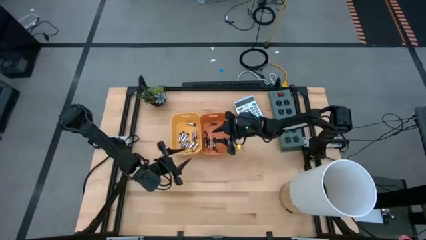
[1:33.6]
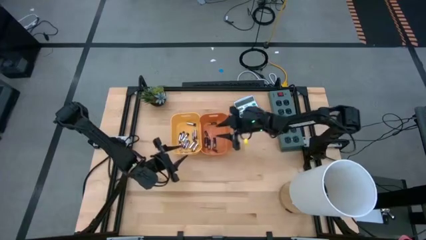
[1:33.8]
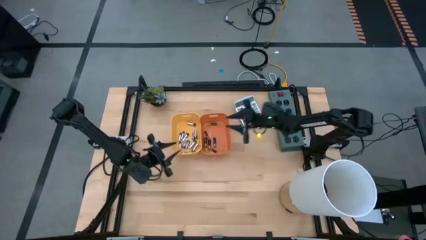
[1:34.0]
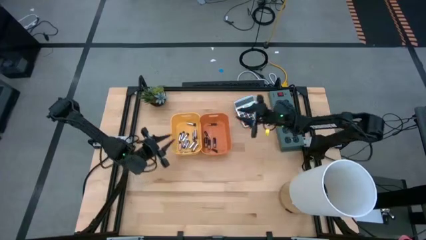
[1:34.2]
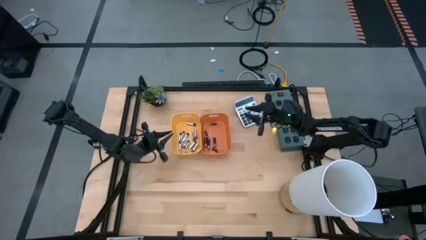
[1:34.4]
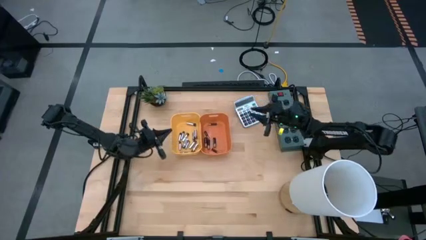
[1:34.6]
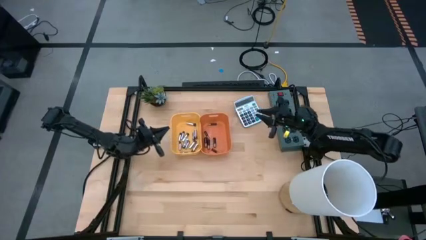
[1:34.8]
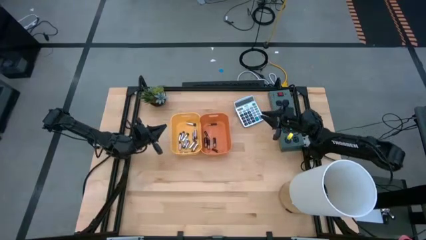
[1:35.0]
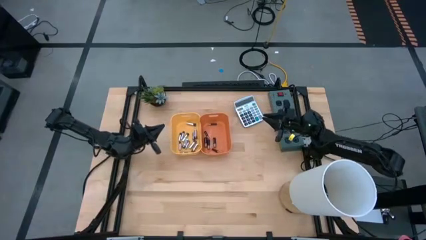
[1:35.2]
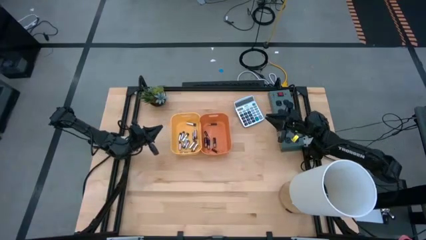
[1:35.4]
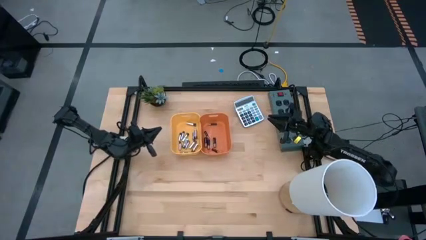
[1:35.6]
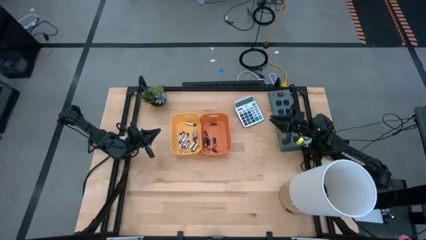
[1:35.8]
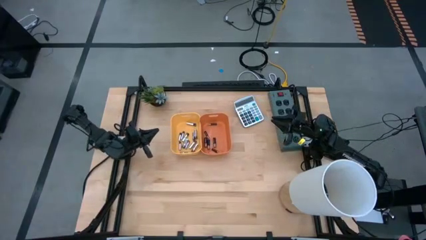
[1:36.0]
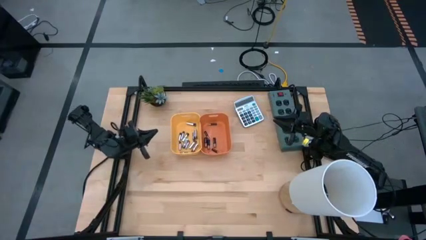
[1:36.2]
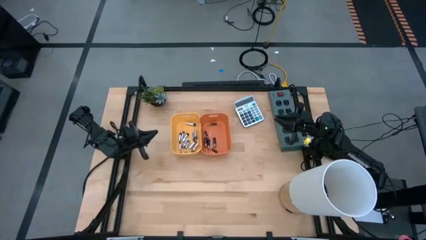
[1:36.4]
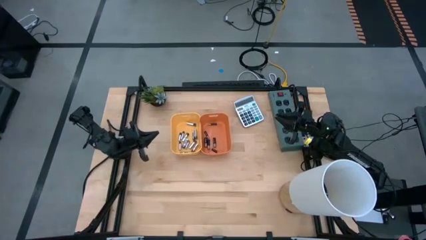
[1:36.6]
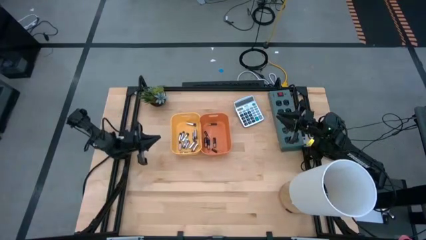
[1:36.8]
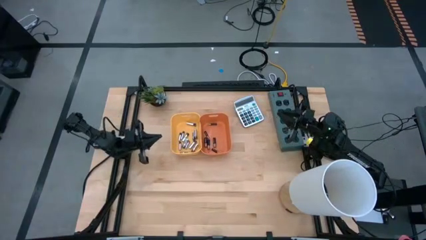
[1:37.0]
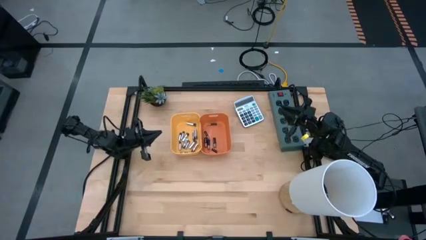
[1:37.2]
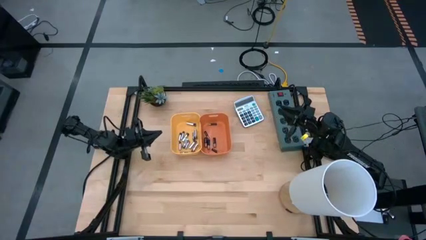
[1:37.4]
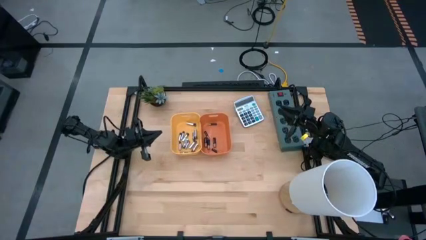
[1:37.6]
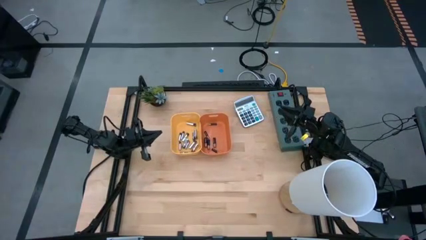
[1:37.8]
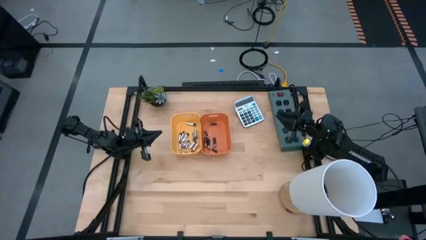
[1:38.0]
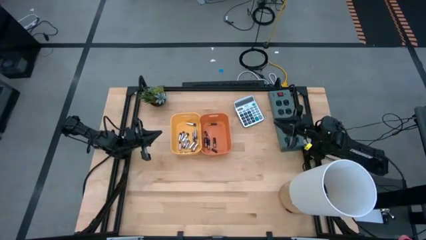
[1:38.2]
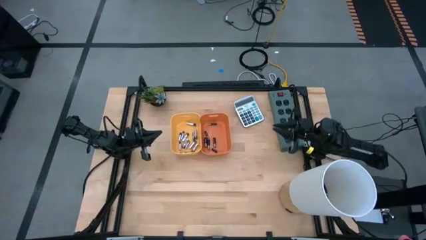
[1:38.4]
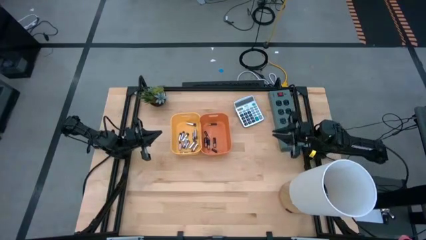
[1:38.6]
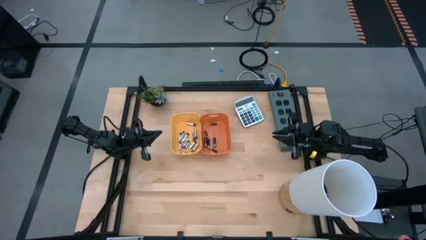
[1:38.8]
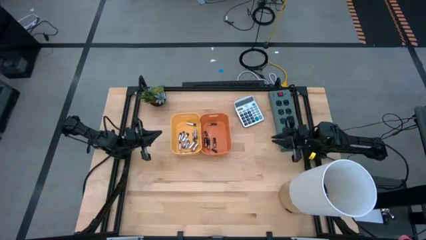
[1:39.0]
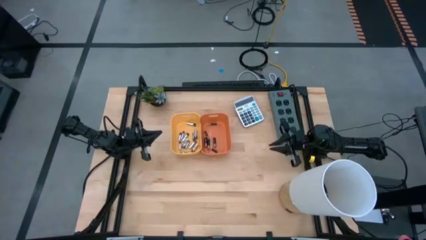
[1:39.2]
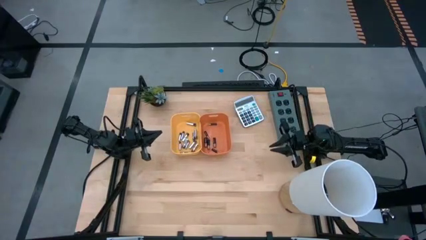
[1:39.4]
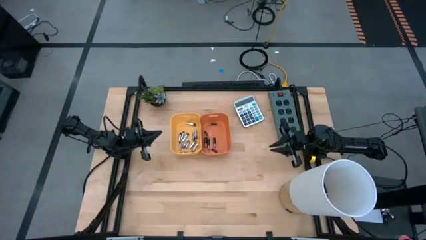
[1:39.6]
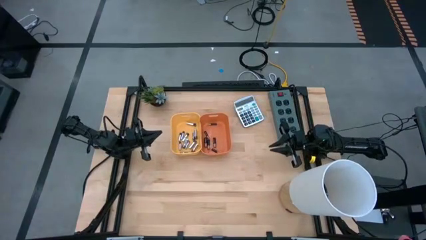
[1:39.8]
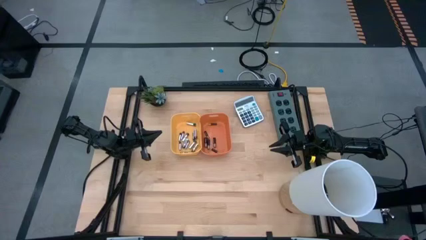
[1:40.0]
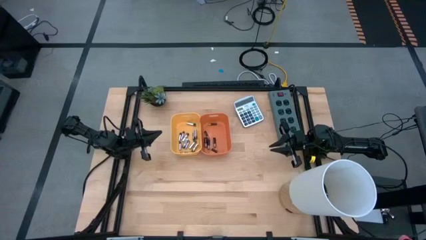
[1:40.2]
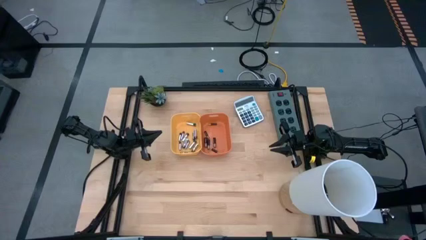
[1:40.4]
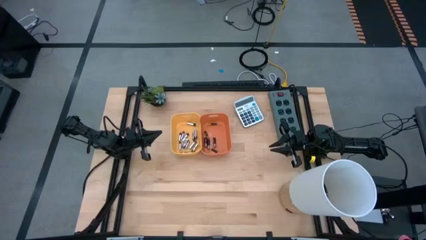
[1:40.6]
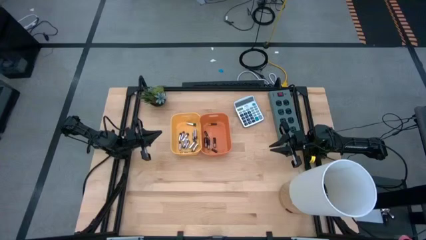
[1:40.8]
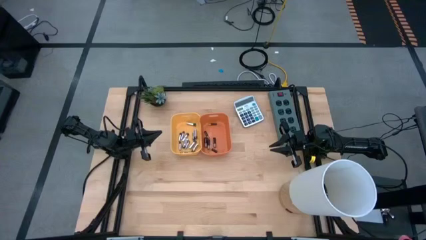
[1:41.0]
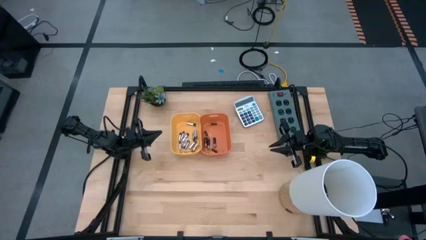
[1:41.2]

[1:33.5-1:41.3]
Task: Sort batteries
Return to Home Position

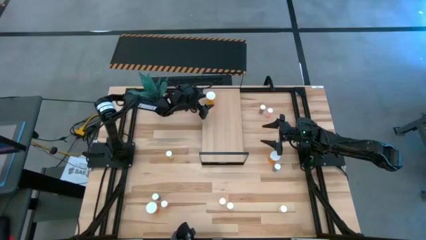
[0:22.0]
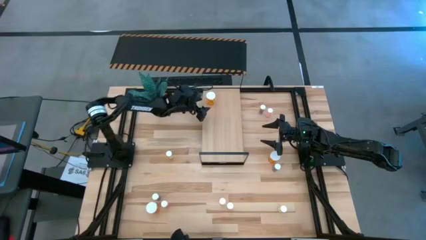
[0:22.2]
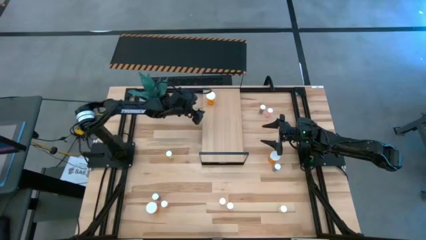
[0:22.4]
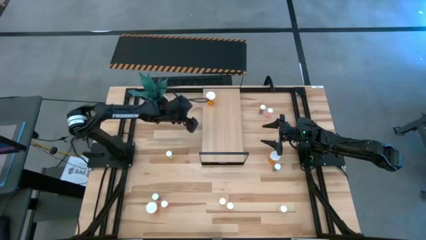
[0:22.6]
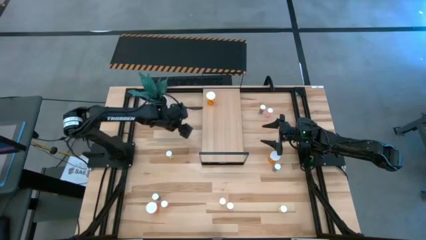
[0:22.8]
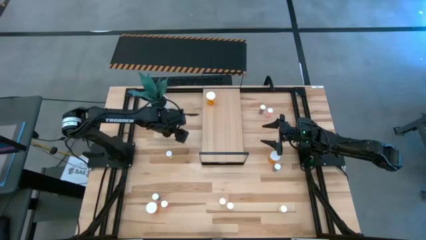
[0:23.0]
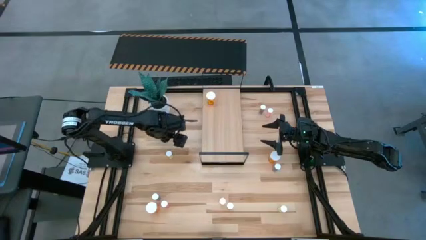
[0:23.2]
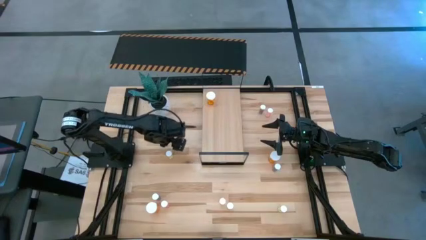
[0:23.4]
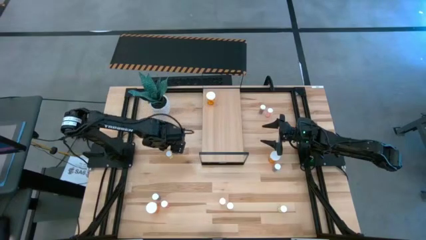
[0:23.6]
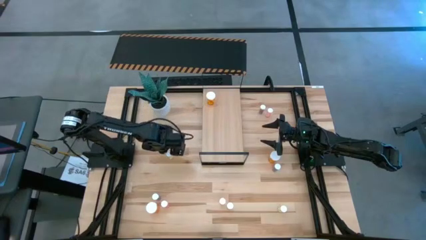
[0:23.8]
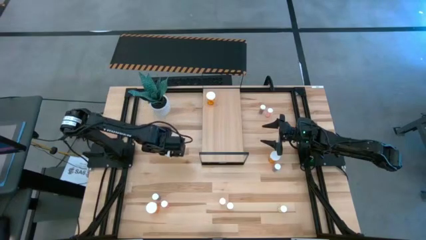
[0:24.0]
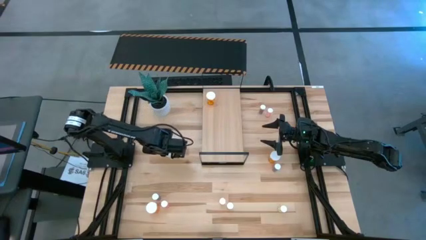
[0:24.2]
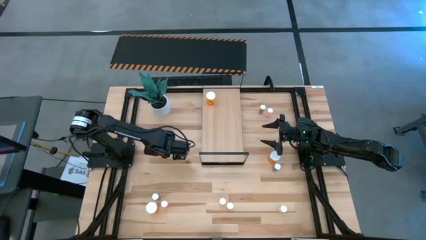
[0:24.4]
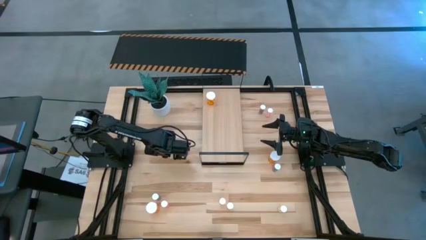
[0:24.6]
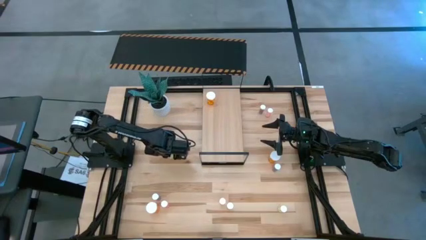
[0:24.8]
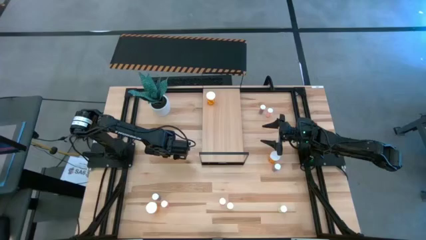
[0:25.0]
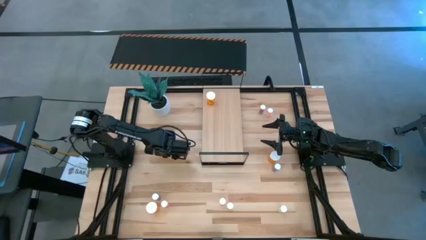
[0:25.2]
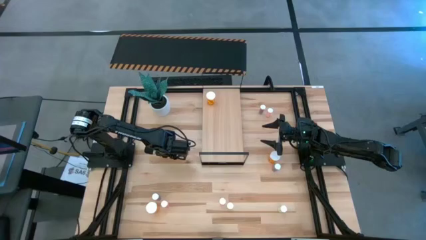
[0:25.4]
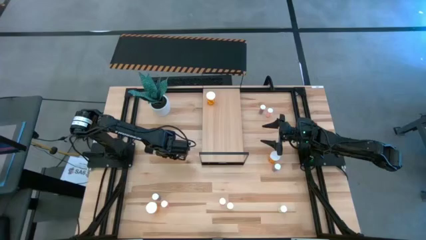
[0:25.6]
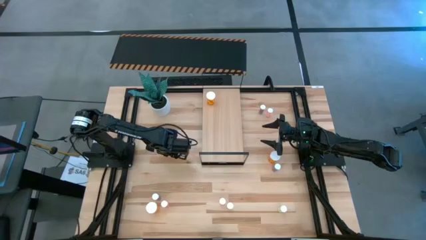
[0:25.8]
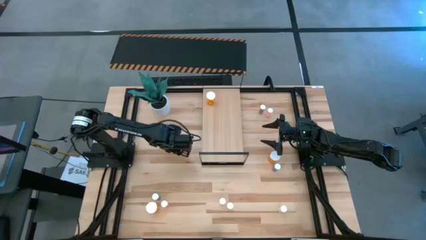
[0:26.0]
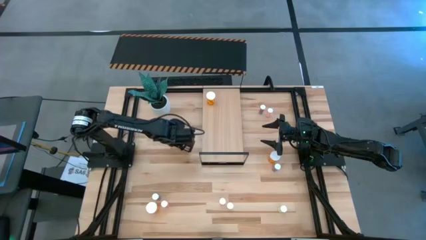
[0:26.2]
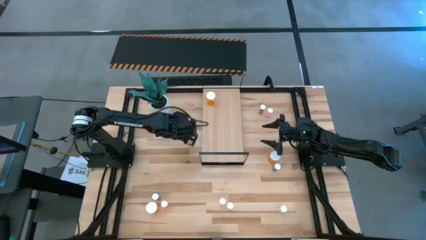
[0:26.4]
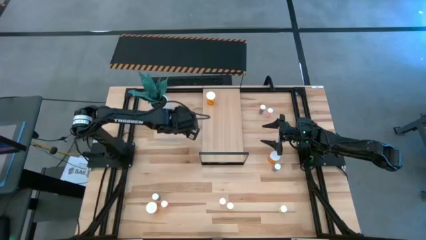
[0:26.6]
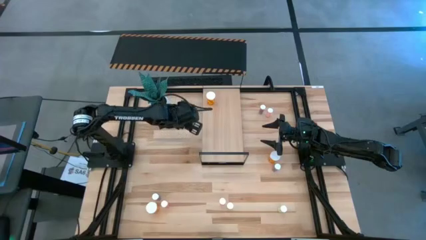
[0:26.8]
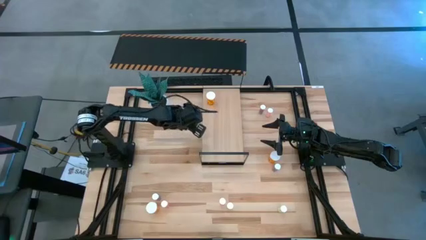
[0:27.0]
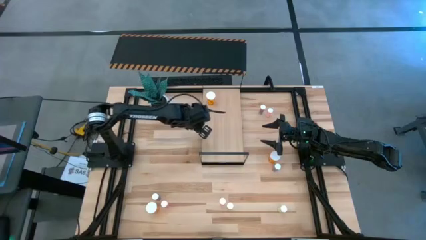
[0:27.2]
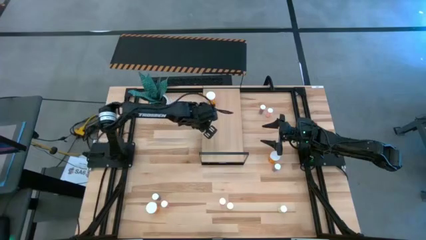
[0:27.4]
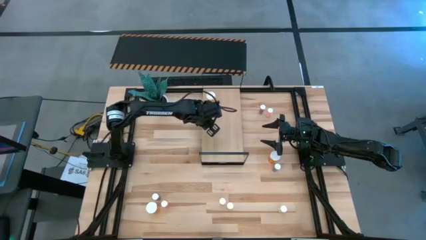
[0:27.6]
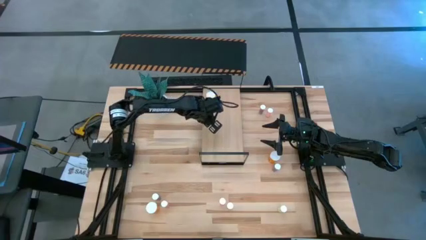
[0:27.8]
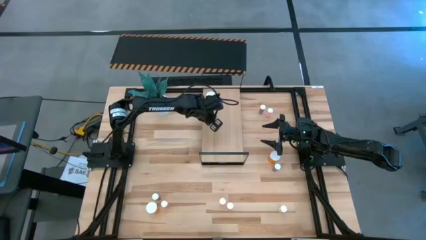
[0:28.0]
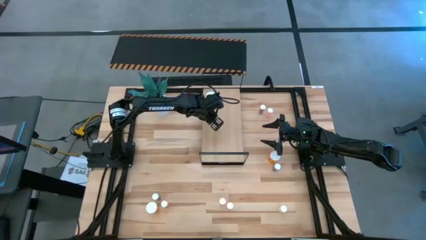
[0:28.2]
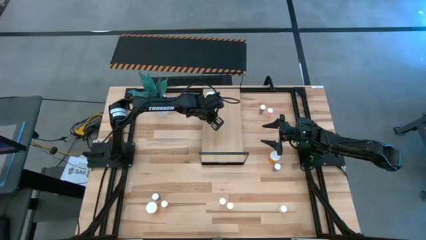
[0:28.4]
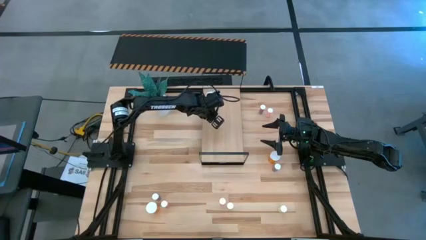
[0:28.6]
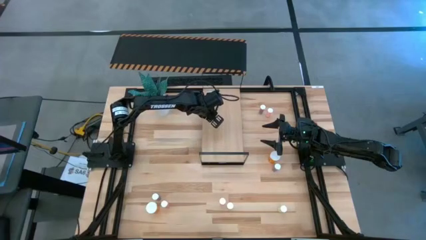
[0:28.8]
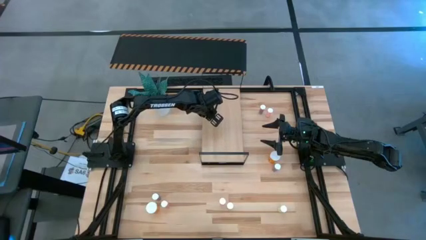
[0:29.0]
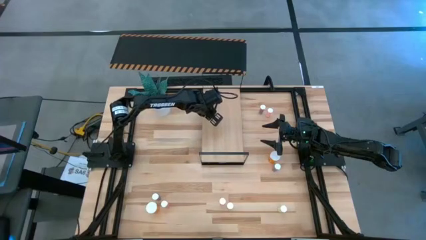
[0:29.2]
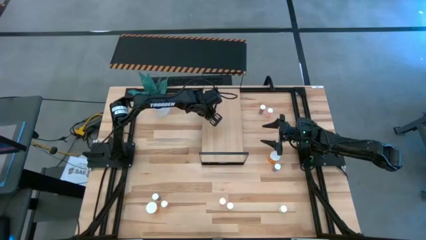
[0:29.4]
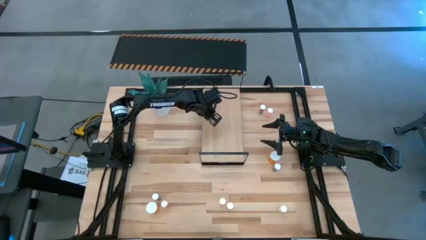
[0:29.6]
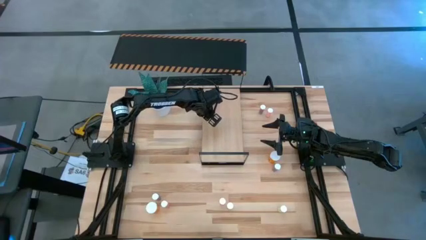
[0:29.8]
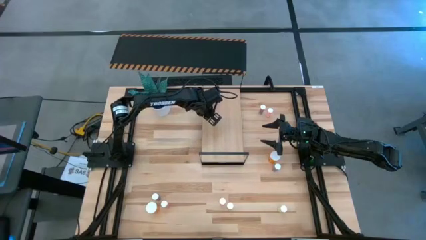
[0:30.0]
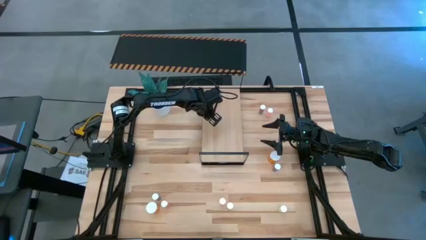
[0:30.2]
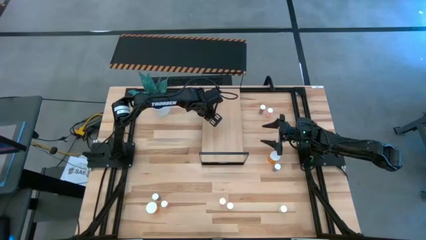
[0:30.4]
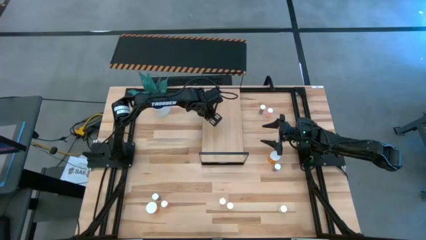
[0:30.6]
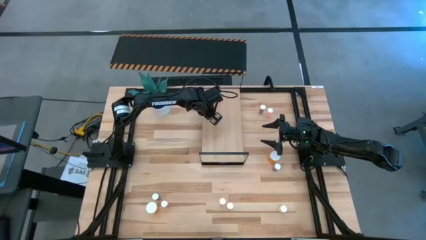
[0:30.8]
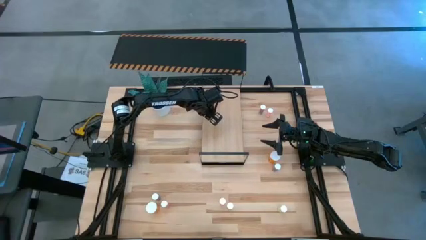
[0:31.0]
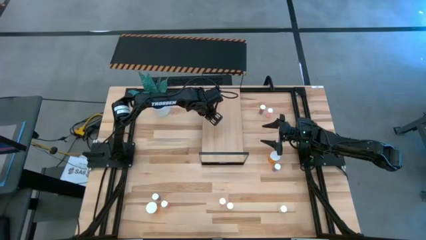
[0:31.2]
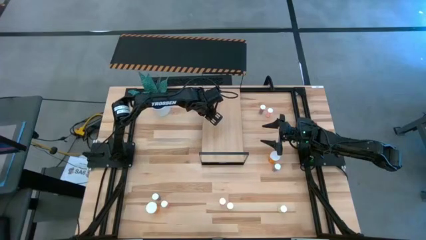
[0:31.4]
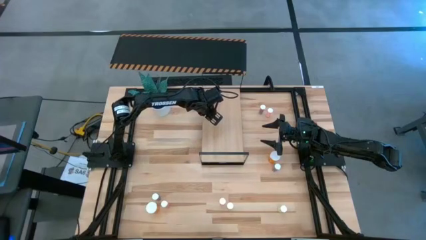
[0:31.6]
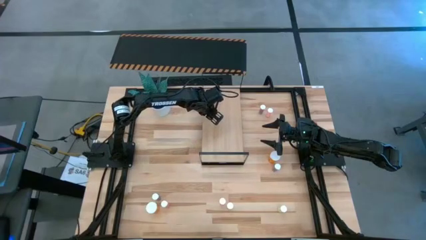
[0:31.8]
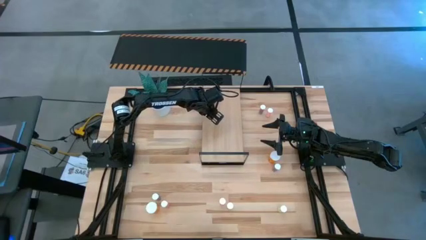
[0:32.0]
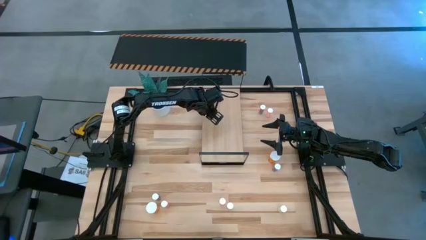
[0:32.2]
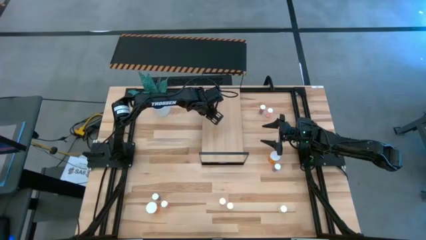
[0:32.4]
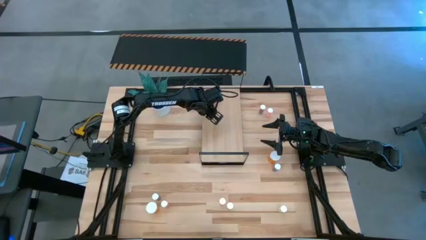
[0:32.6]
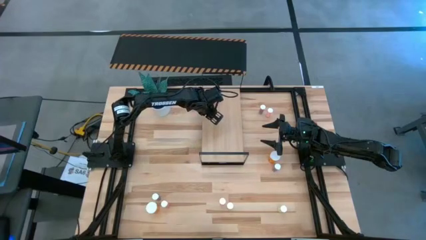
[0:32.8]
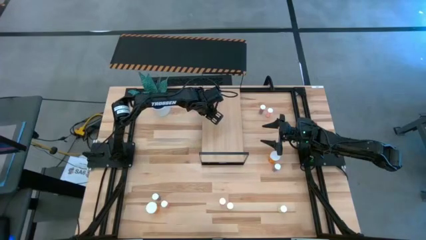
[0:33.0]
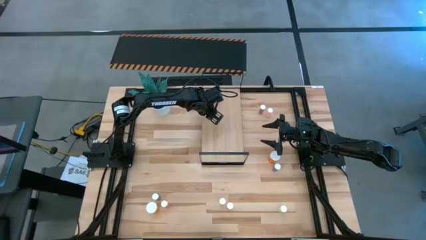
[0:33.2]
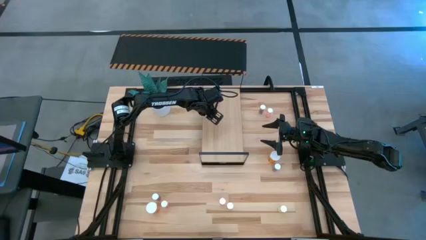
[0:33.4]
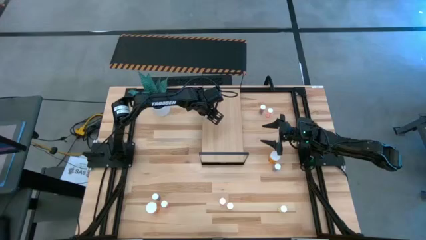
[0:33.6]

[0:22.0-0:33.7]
Task: Pick and place medicine bottles onto shelf by color
Put the top small yellow pill bottle on the shelf
